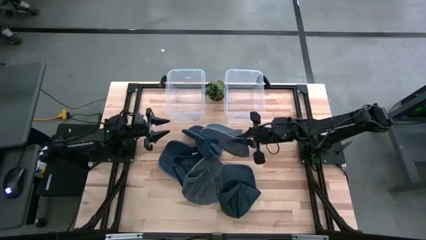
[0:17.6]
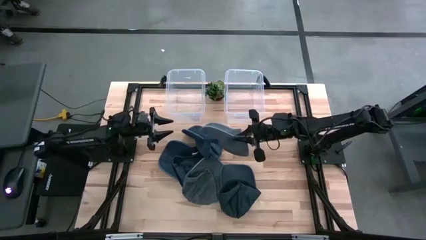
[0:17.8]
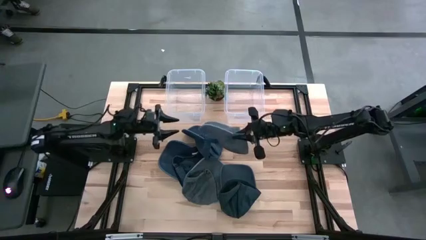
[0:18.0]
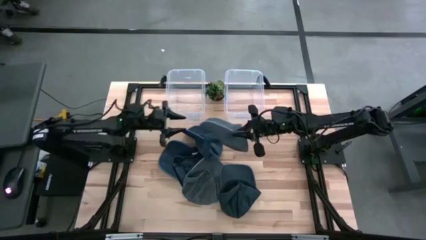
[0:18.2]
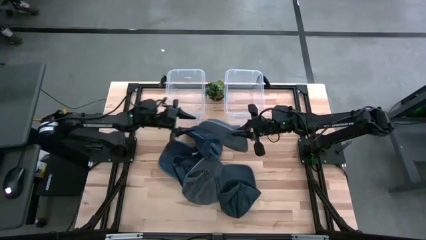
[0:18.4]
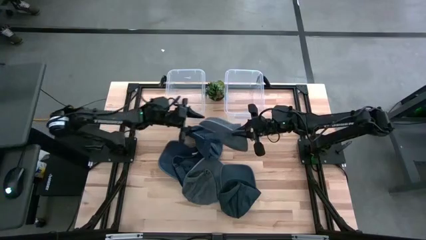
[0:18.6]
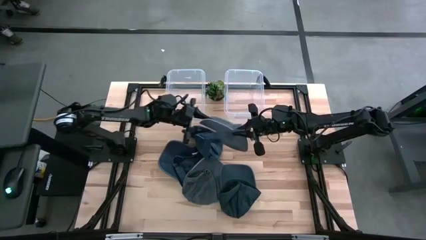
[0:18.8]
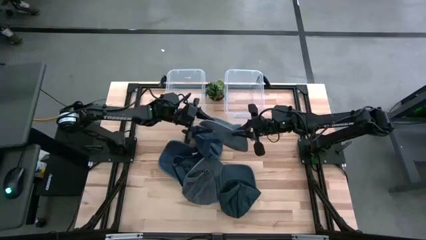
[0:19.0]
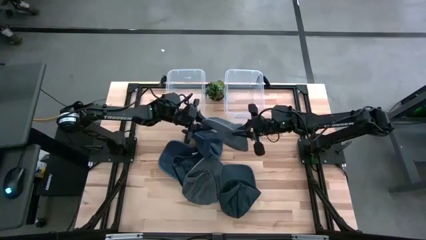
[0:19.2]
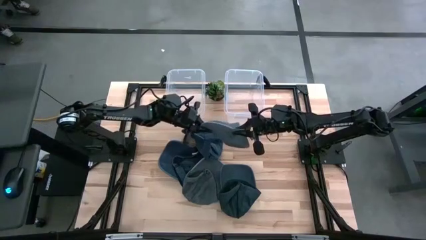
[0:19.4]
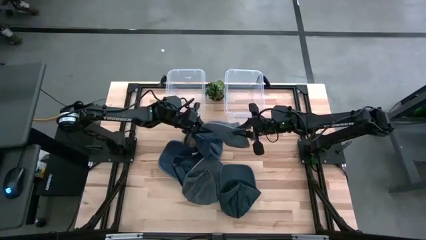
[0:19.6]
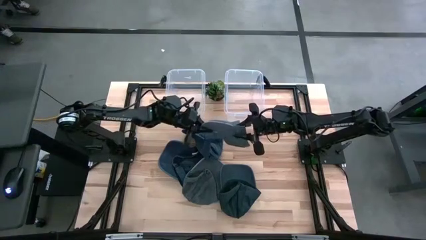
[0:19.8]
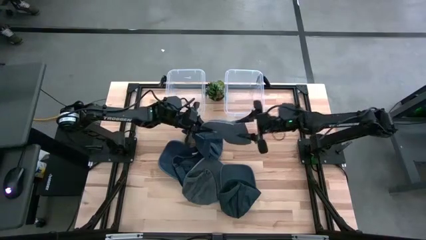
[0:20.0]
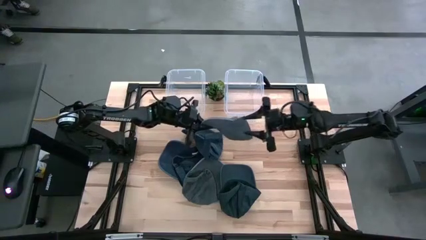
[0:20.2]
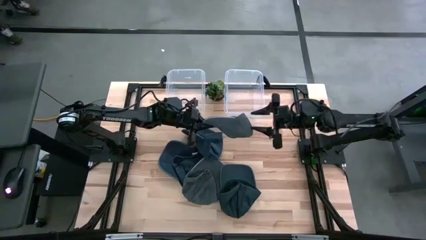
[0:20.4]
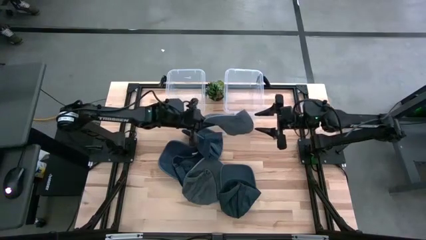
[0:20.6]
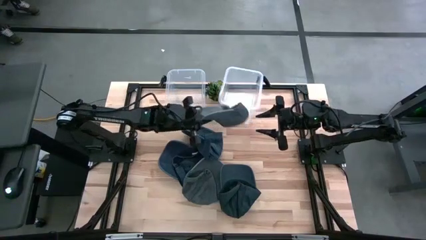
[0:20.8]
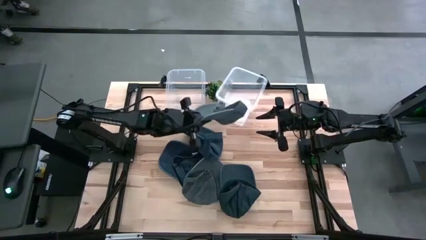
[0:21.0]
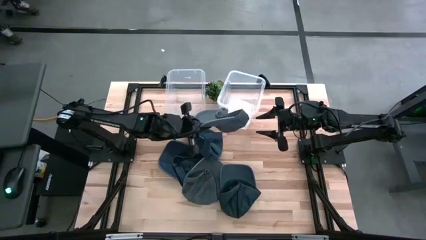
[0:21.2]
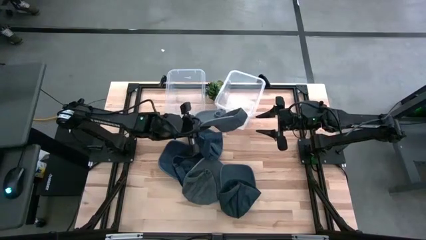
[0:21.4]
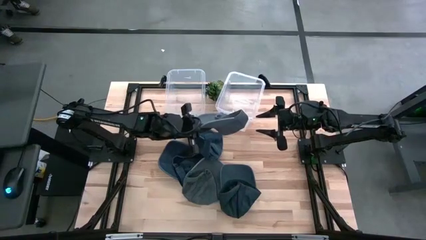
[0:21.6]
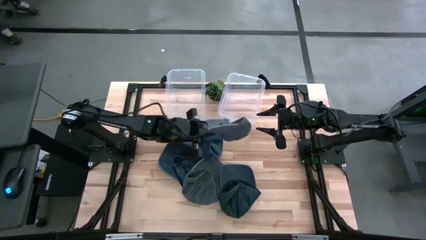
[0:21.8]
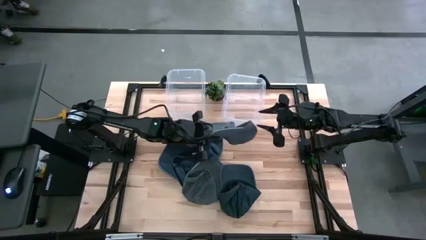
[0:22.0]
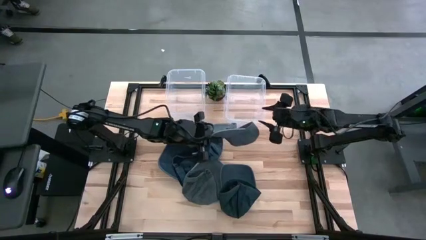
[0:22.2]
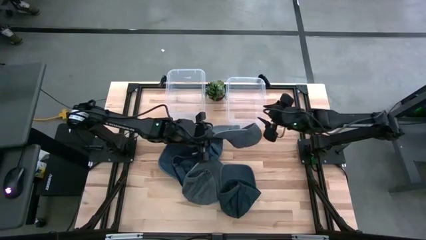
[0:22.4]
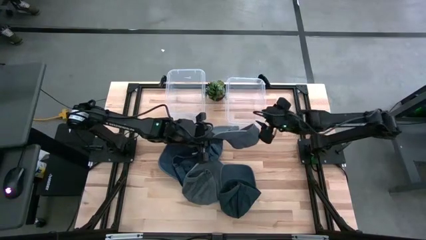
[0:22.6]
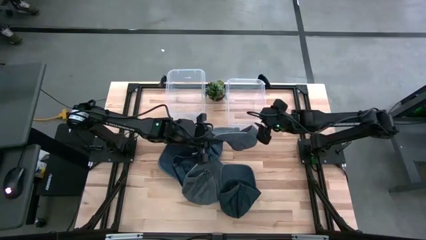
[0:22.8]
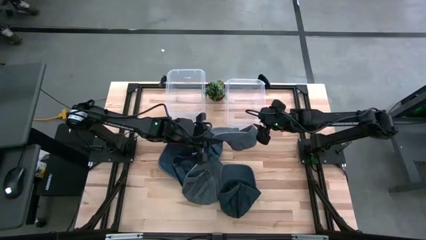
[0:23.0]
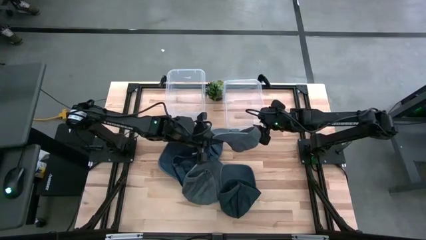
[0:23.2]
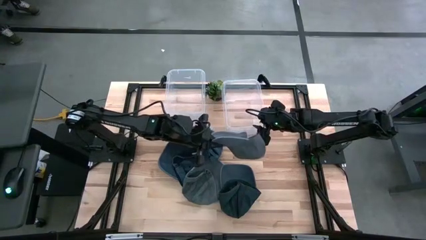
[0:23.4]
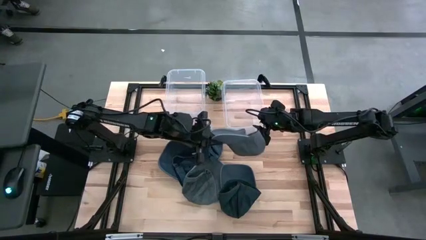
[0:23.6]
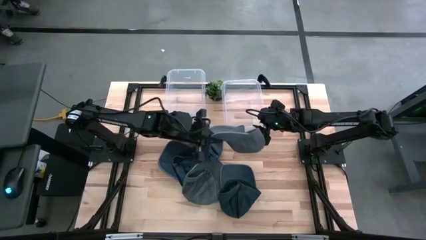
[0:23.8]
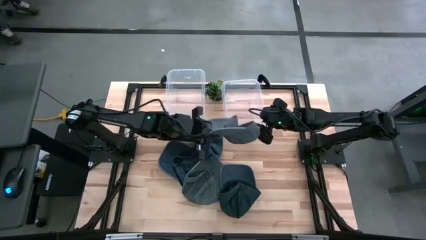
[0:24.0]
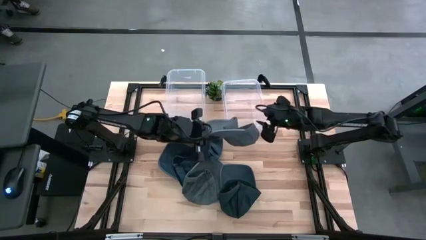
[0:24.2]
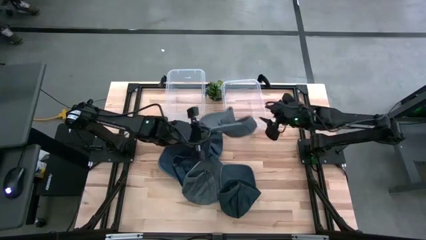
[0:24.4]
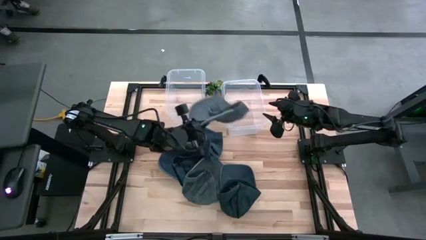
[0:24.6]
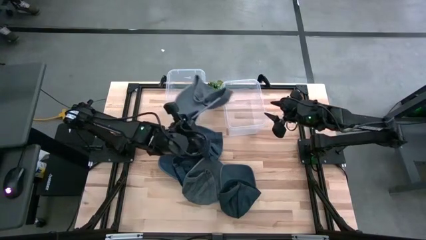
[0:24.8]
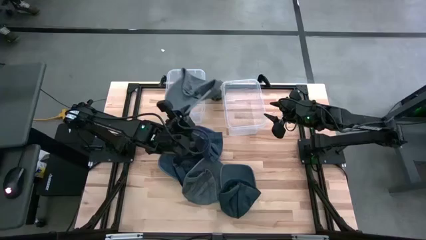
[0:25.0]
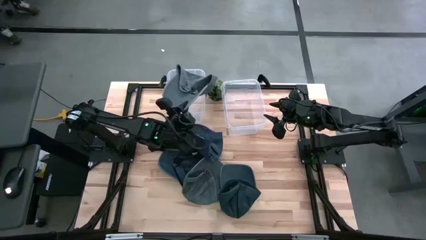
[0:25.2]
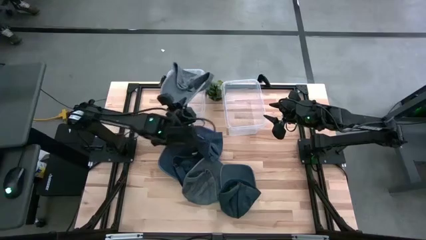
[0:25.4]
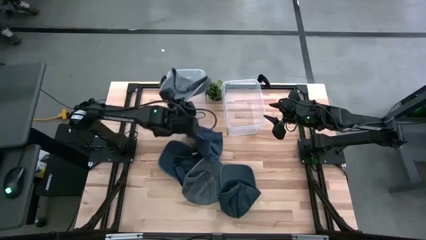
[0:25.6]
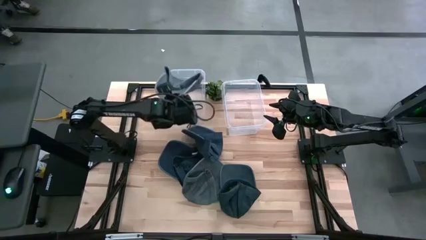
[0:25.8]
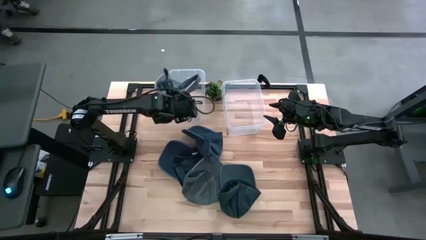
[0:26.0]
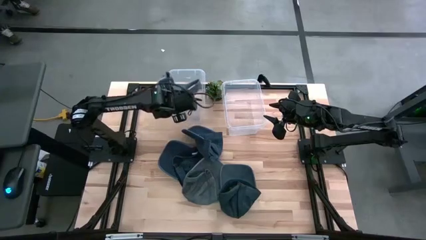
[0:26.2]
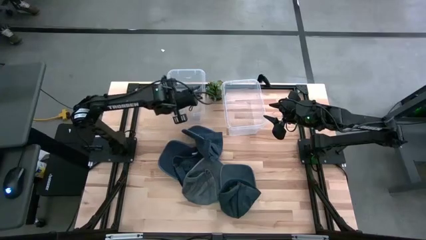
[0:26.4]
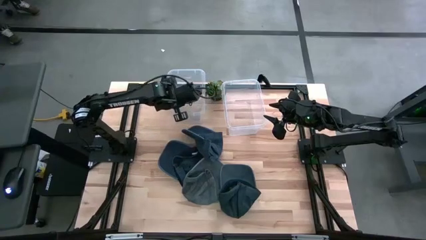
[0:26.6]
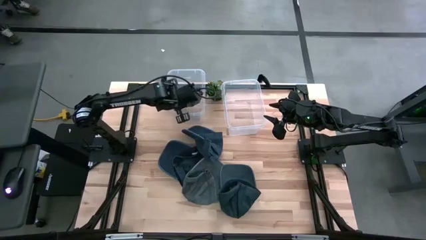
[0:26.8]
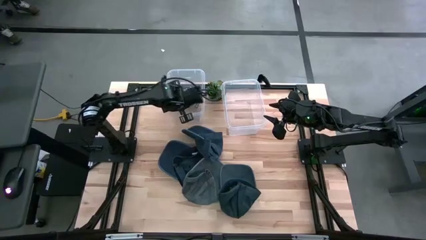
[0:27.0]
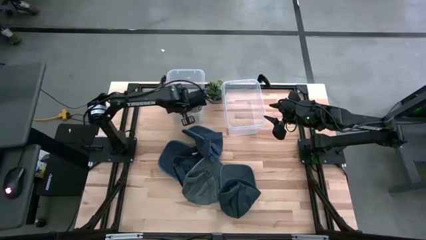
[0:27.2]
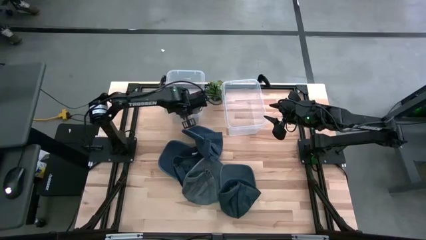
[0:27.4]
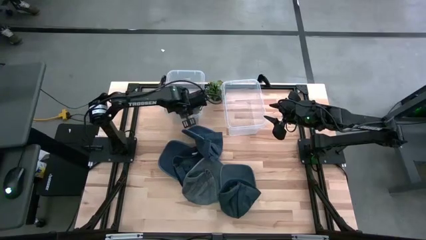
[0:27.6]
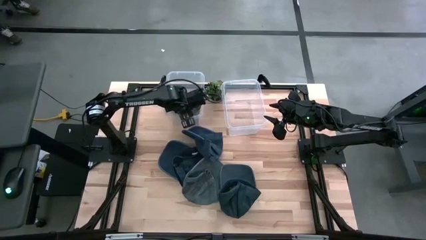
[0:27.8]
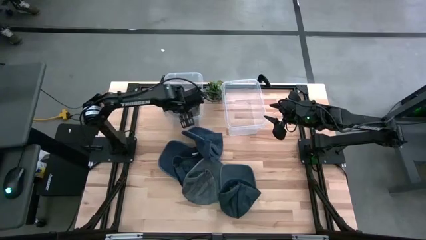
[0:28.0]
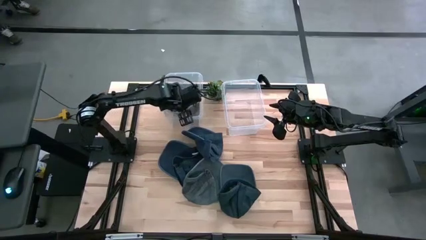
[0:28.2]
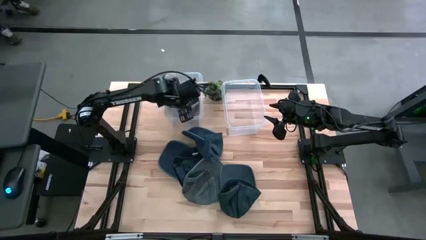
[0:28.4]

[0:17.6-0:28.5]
Task: Pick & Place hat
Put the top gray cap into the left transparent bin

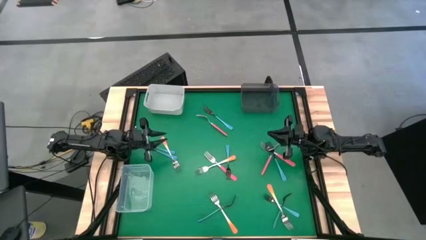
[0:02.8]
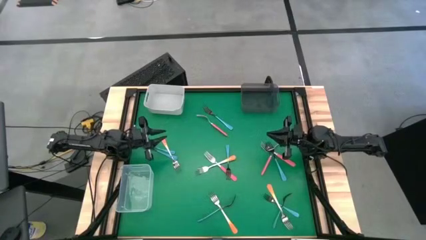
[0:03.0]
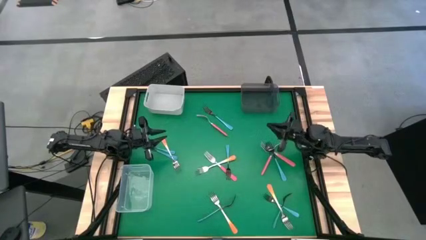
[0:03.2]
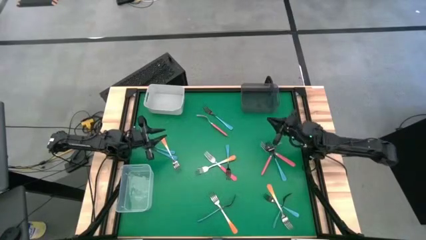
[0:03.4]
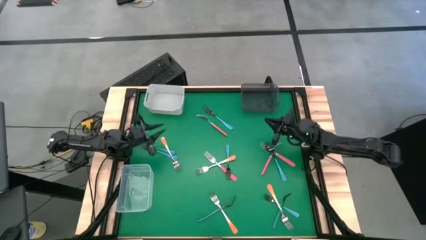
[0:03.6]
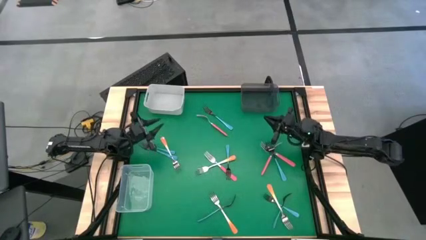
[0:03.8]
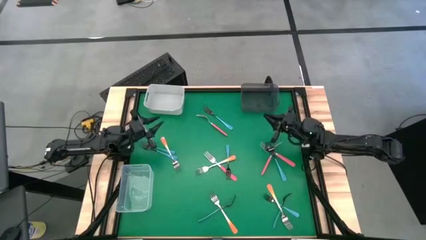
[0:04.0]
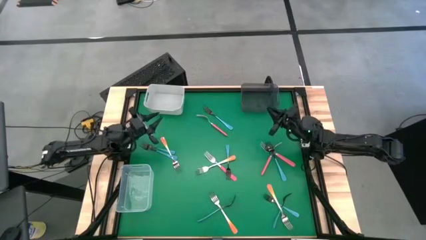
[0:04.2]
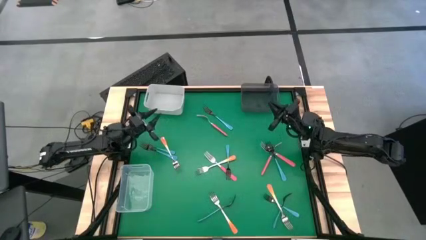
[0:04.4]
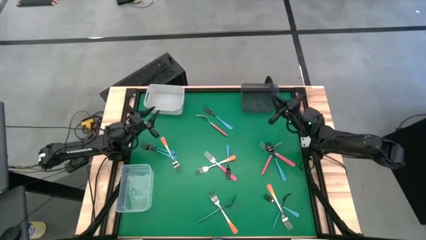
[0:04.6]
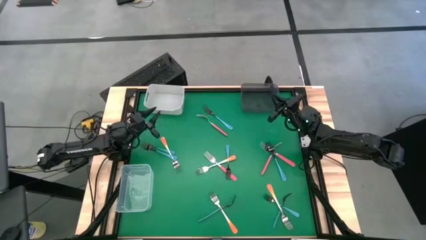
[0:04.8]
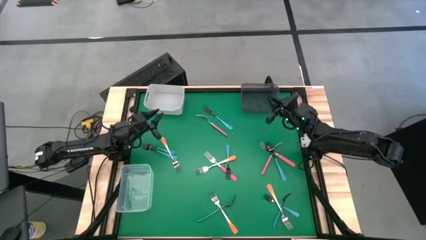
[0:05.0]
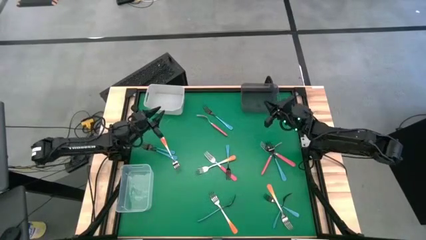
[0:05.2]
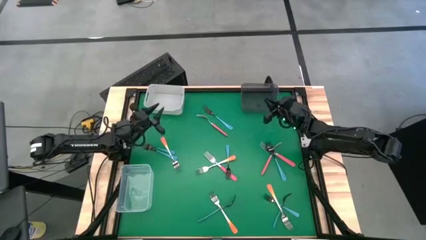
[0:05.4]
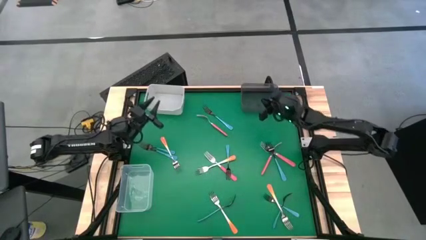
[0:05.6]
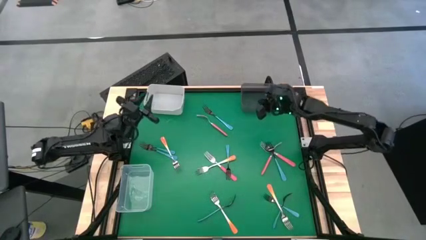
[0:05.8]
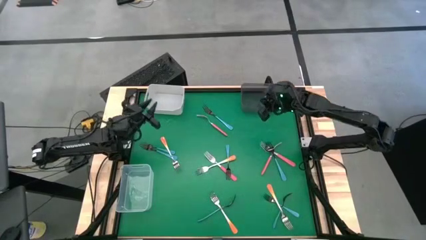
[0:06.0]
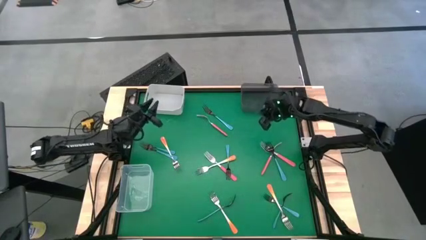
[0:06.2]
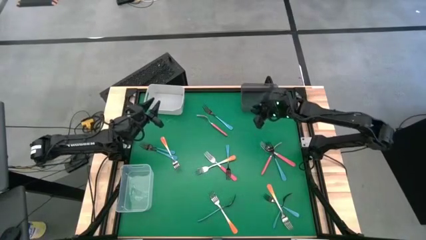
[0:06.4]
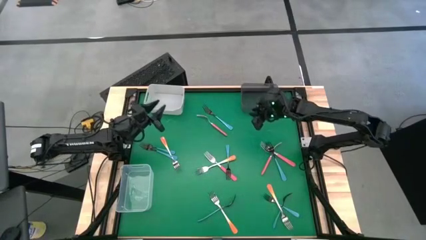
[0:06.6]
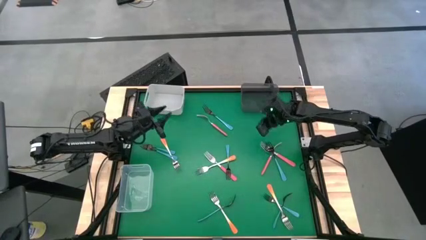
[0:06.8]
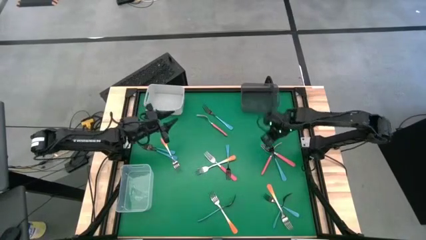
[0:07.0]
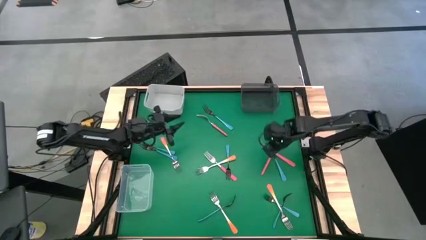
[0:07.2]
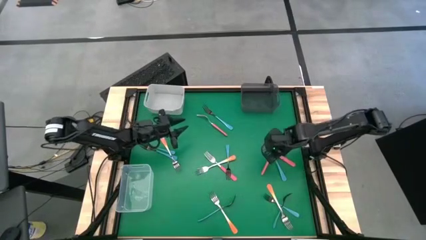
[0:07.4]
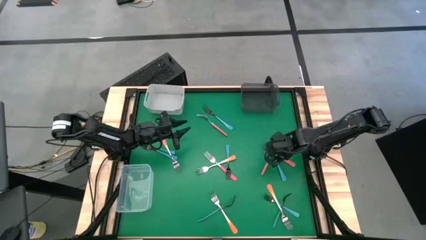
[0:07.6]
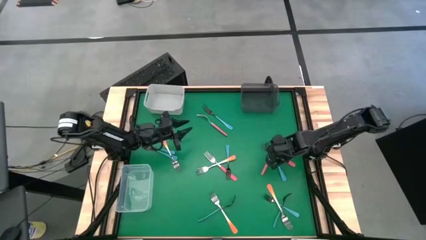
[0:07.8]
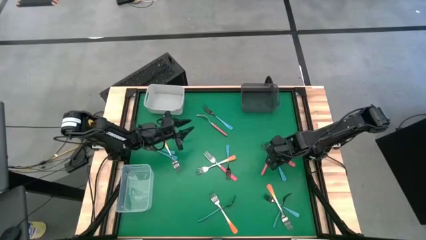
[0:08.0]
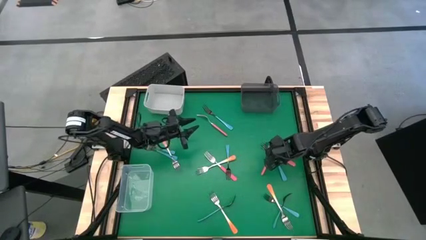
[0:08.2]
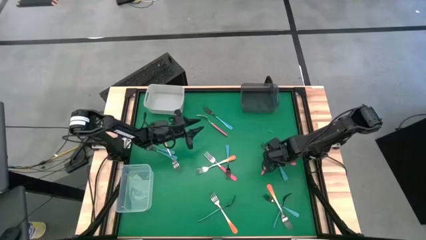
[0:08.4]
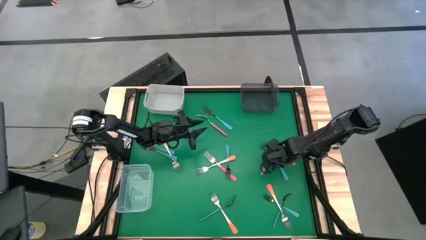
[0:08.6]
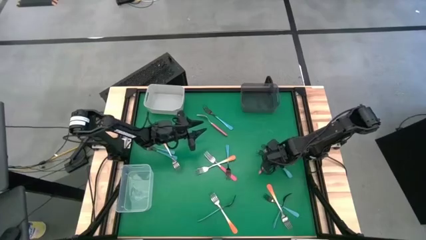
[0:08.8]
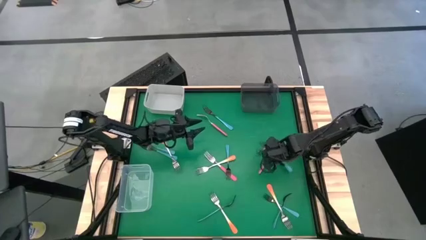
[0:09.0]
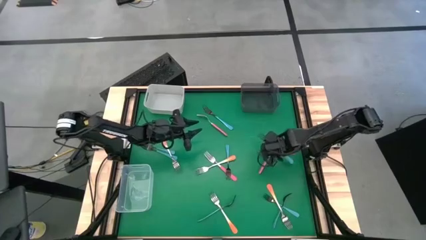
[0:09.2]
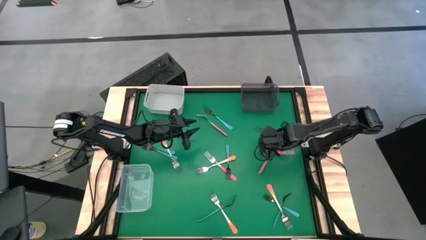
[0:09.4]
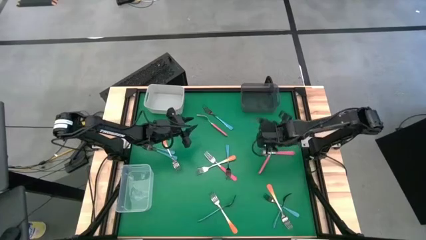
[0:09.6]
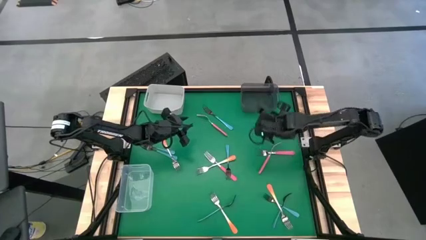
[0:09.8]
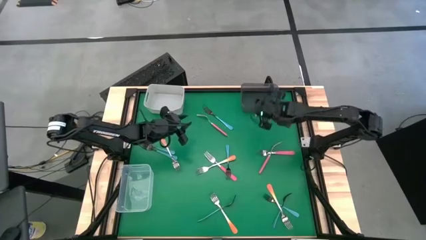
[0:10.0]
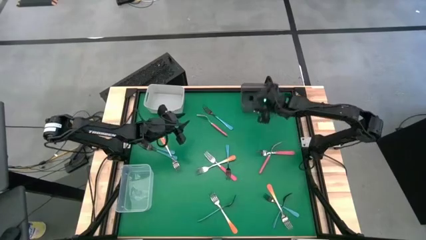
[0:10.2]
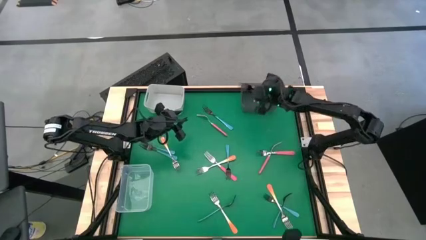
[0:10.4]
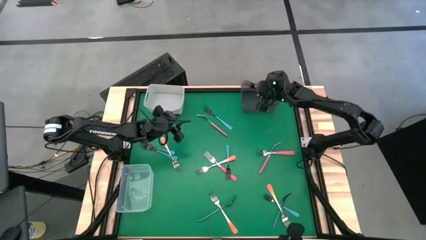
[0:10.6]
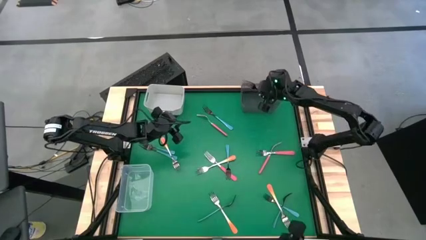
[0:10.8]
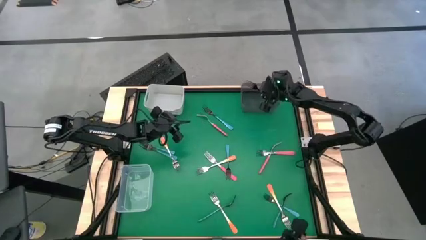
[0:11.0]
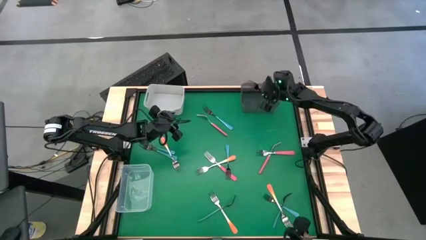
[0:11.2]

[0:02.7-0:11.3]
Task: Sort silverware by color (type)
Put the blue fork into the black bin
